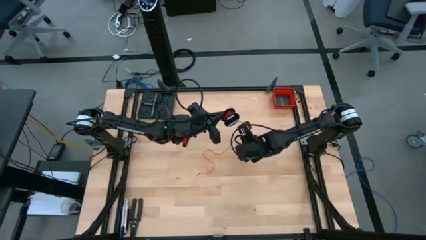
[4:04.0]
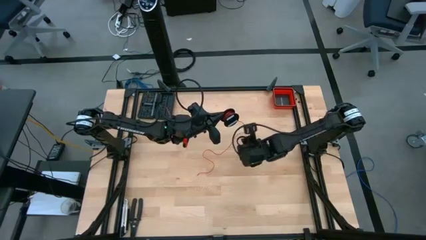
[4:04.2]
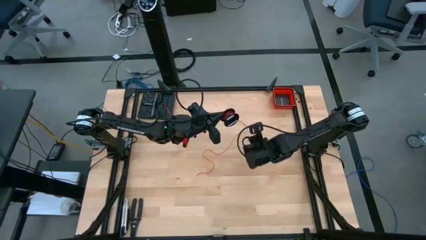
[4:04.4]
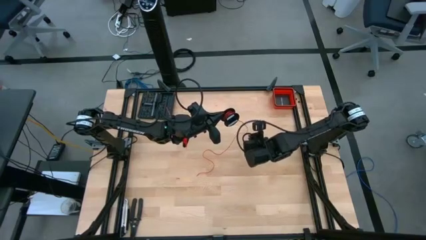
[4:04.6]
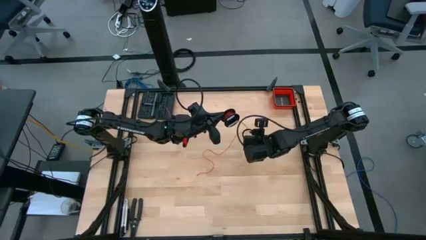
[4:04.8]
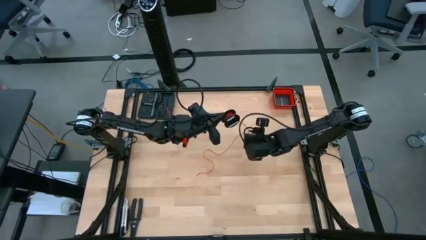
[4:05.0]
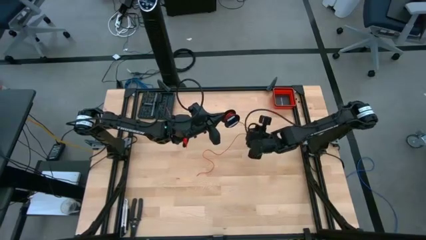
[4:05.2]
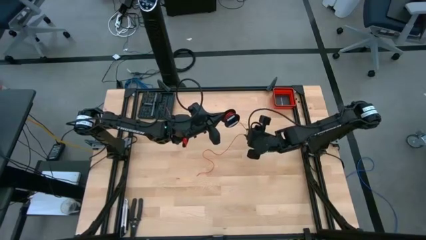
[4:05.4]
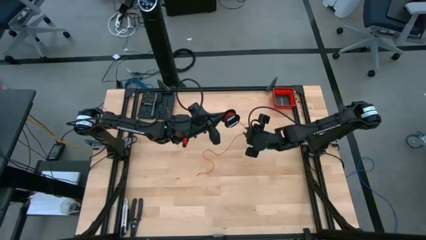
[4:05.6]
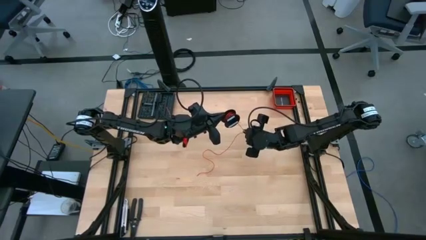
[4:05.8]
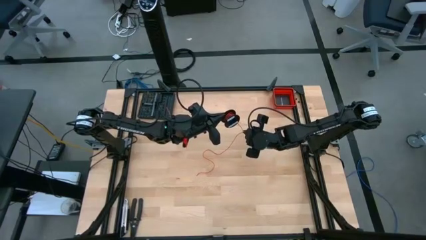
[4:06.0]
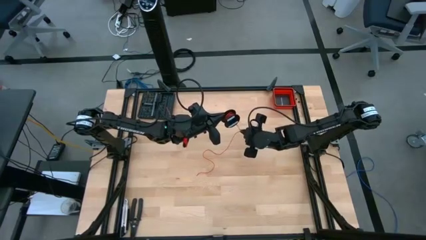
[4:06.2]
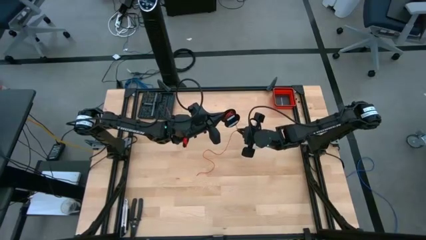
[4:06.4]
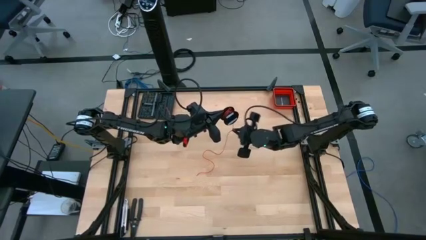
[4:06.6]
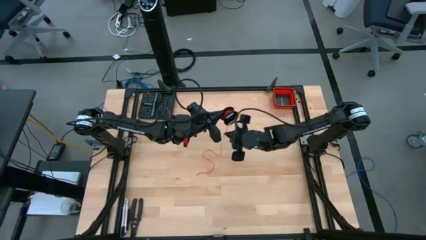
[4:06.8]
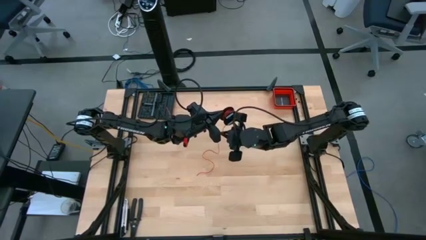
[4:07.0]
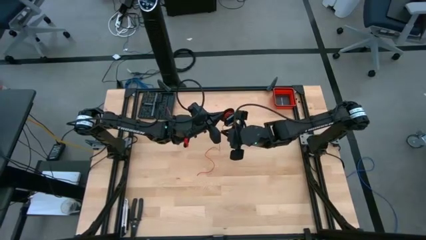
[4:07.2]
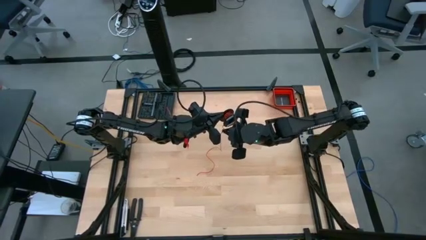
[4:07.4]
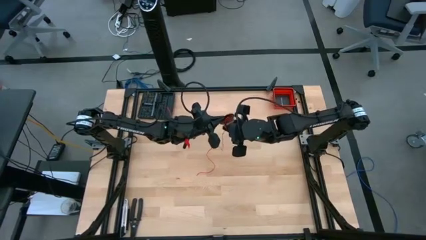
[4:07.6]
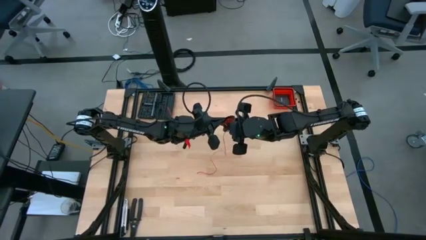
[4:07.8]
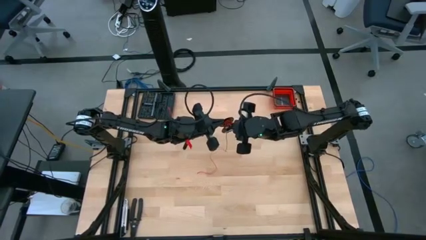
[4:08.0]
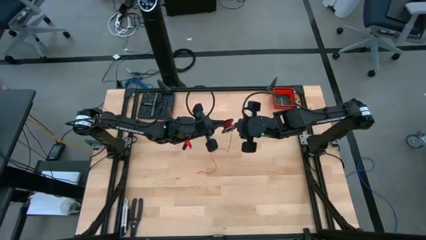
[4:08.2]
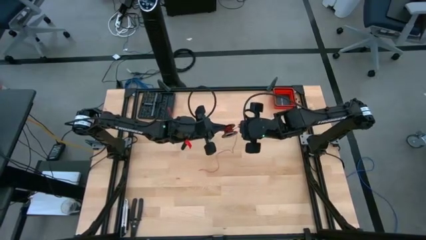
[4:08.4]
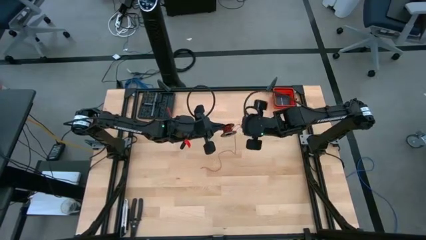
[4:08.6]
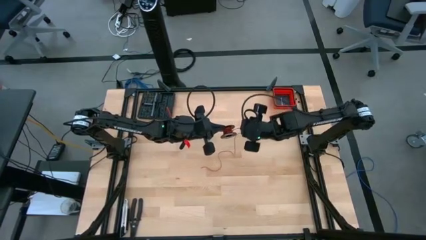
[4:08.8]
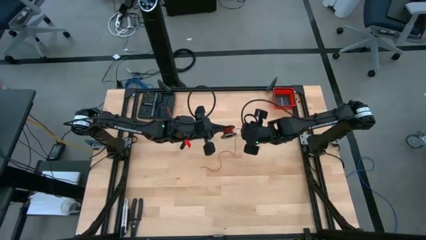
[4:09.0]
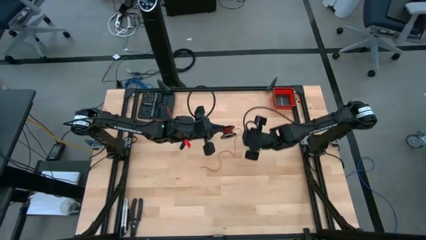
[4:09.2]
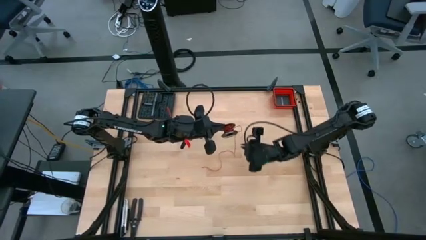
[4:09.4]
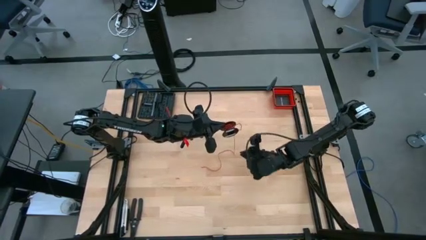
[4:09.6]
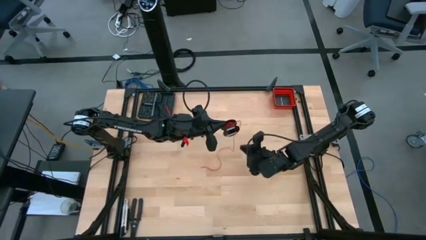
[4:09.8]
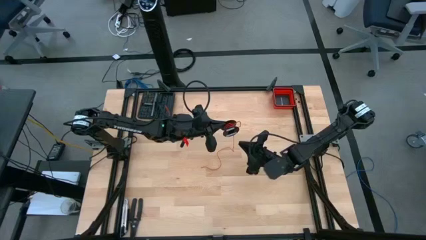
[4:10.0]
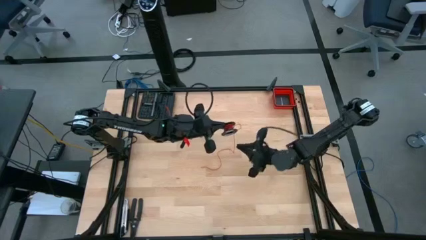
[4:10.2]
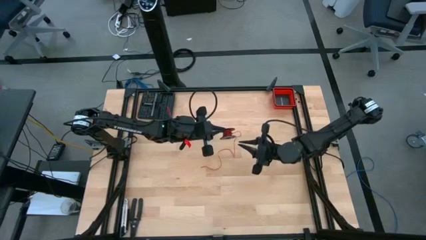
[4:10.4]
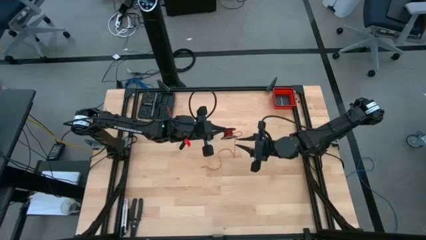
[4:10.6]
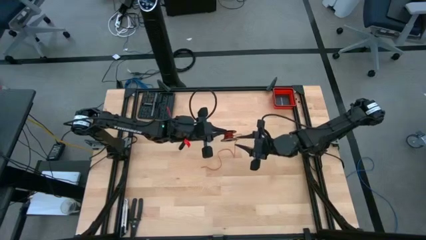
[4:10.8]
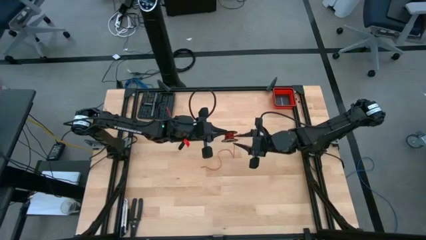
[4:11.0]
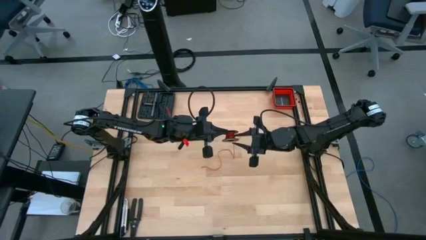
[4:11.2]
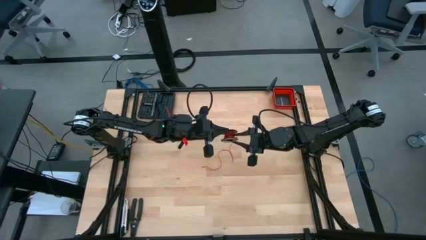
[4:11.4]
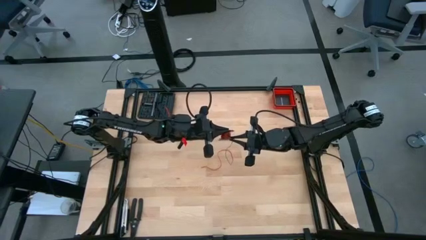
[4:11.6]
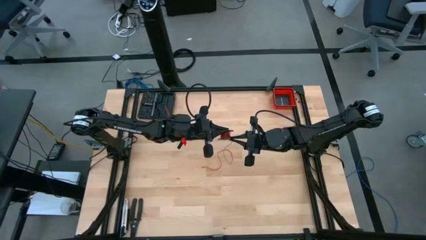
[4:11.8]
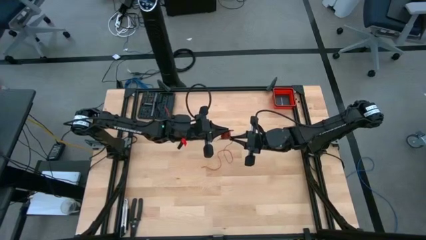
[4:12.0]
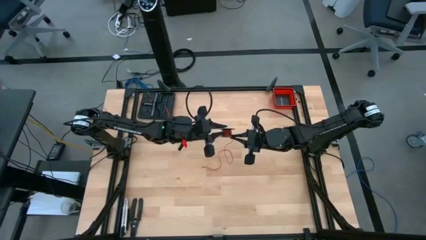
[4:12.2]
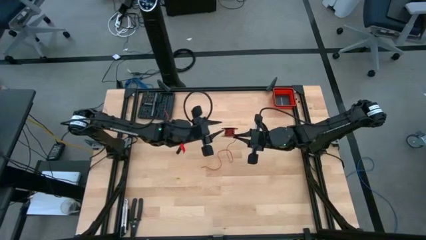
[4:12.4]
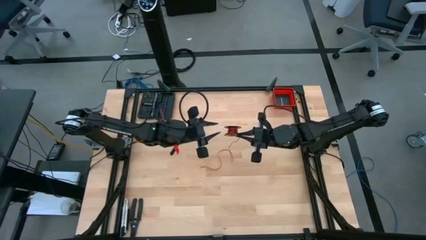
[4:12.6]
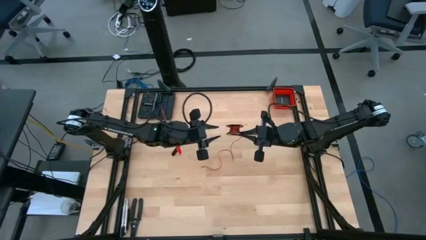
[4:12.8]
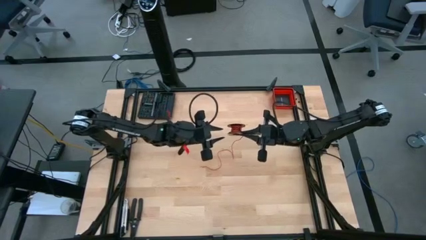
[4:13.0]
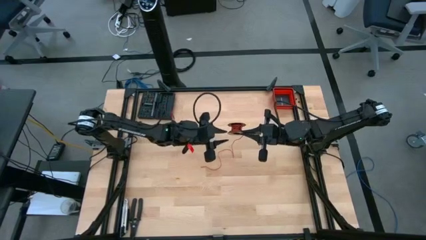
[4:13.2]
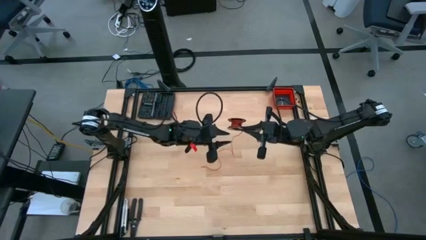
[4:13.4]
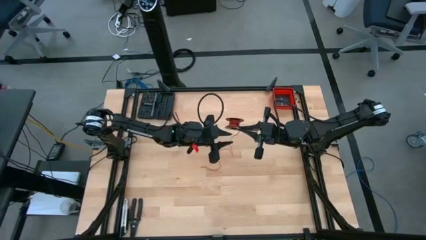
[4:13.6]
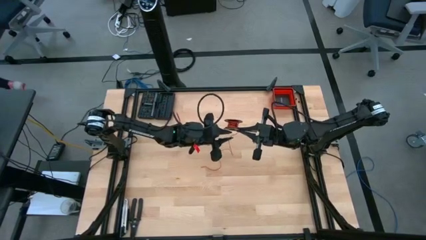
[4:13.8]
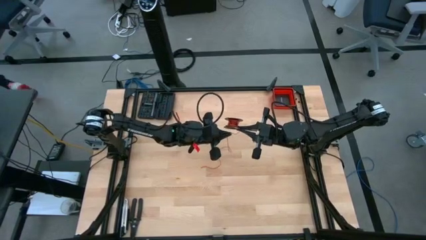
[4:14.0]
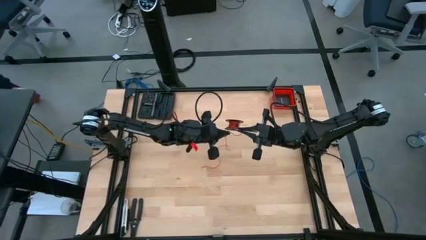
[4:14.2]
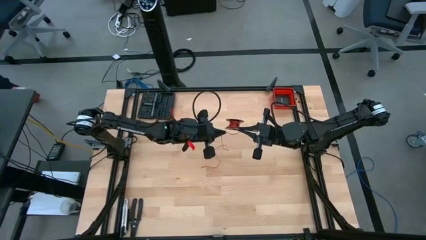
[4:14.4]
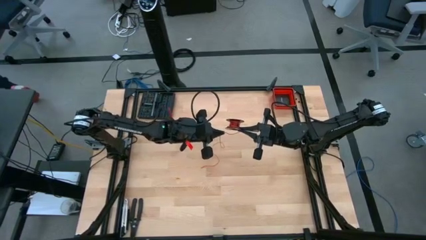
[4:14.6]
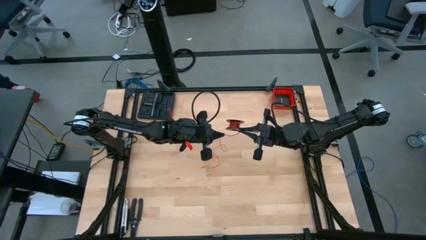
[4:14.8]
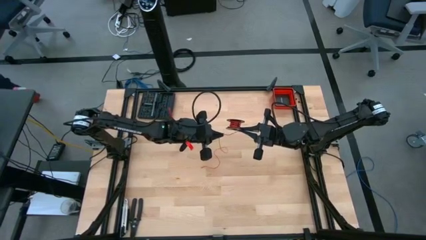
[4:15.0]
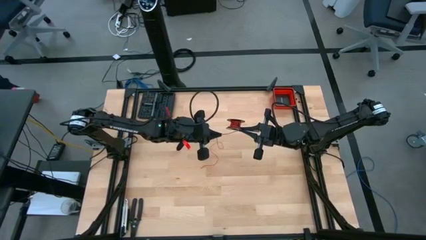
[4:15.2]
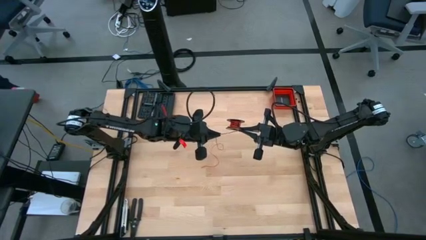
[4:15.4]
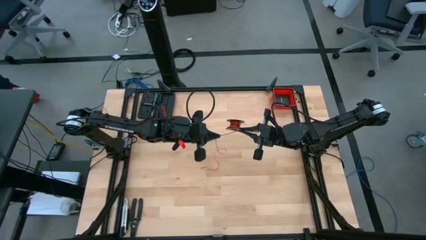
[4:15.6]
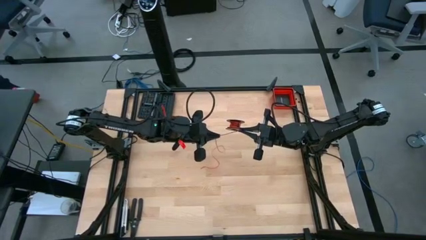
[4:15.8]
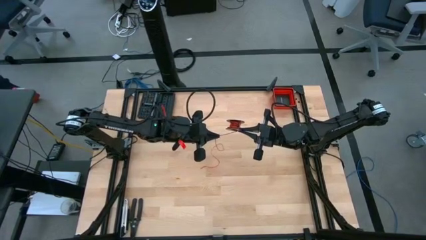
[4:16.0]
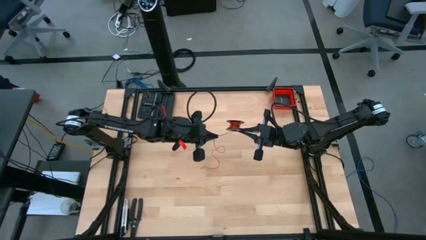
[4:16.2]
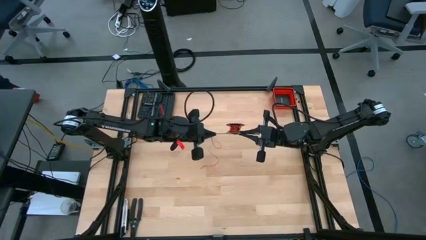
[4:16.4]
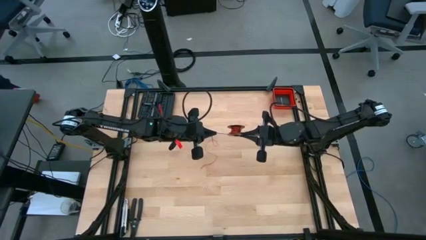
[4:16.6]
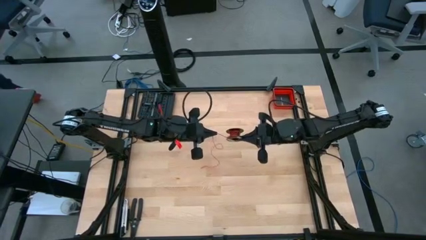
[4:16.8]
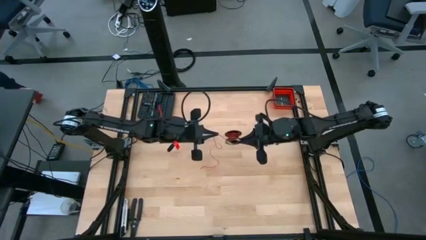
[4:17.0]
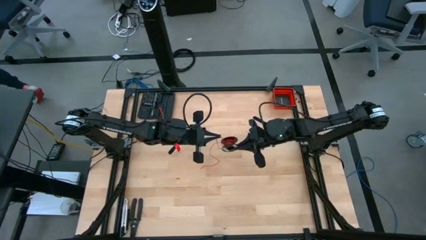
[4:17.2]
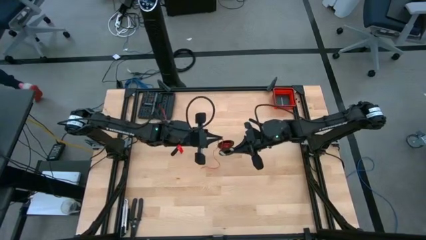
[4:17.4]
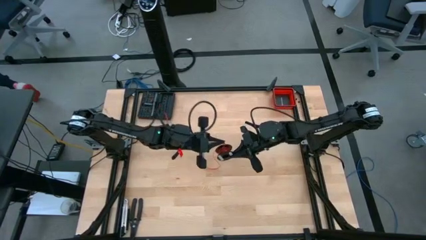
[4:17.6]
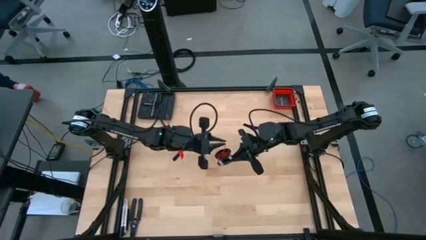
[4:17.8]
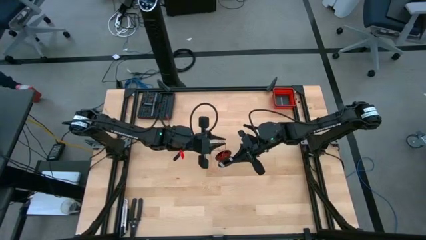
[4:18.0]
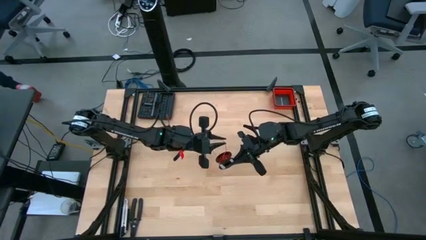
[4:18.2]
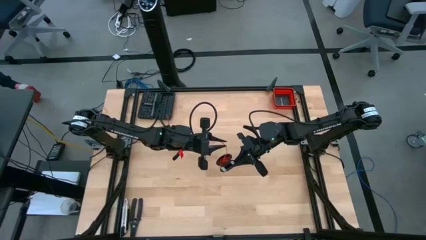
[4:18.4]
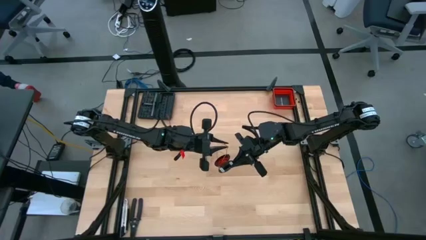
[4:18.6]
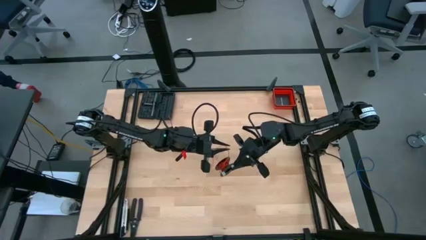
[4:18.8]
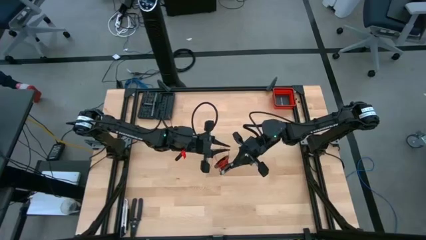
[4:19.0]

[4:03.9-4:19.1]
Task: Coil cords
Coil the red wire on the black spool
